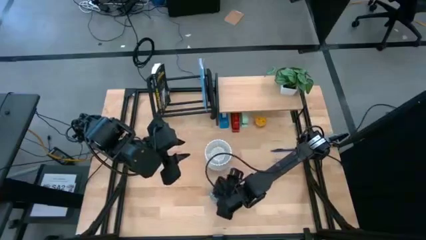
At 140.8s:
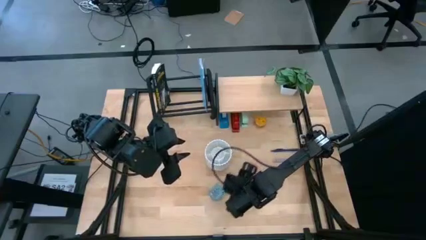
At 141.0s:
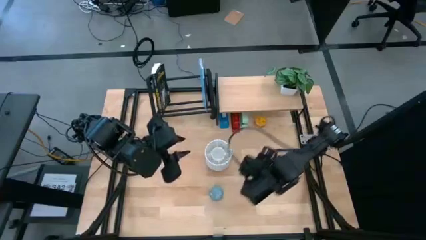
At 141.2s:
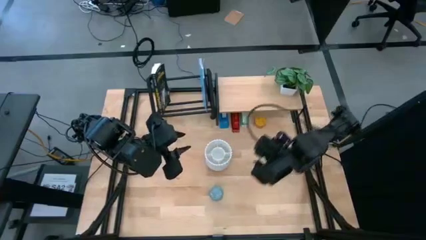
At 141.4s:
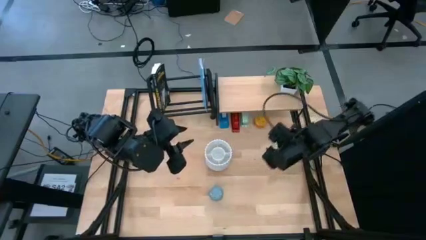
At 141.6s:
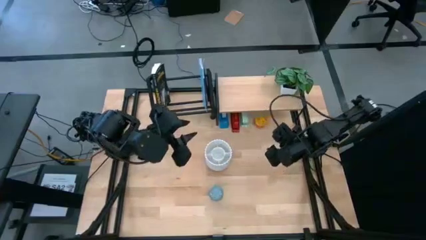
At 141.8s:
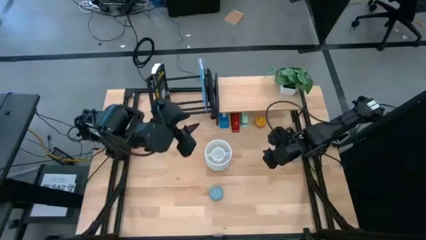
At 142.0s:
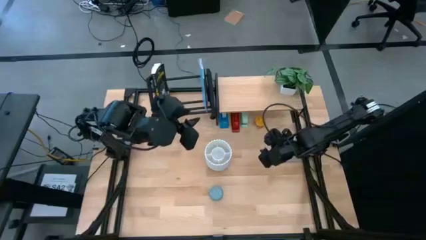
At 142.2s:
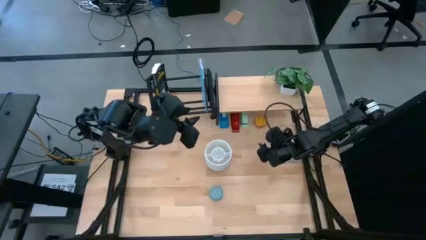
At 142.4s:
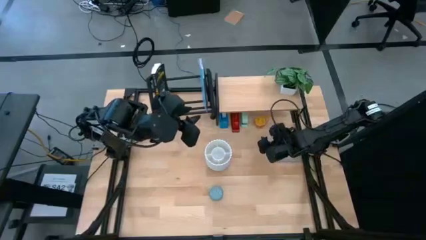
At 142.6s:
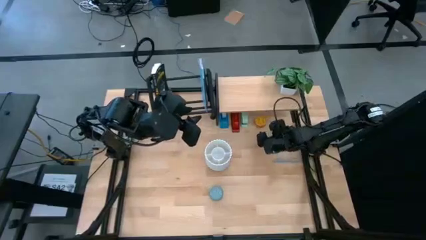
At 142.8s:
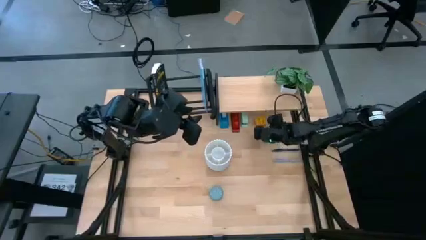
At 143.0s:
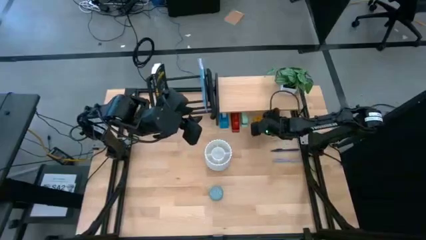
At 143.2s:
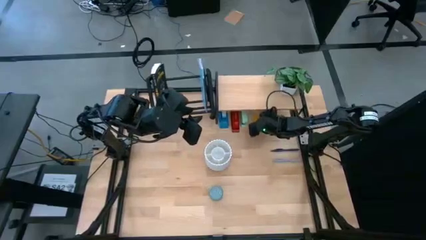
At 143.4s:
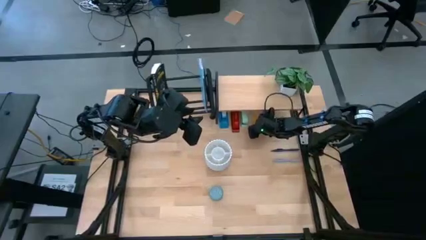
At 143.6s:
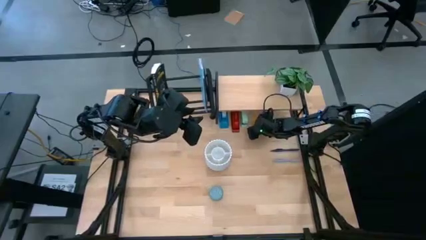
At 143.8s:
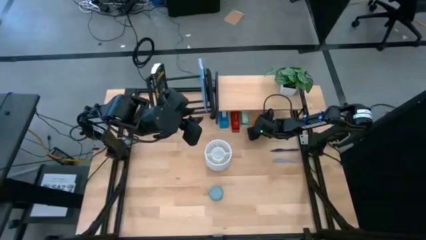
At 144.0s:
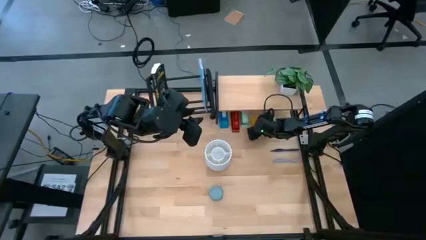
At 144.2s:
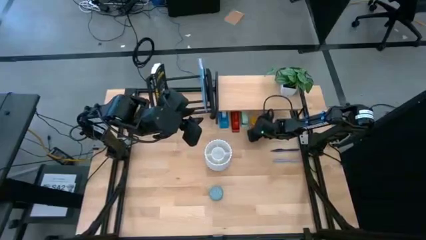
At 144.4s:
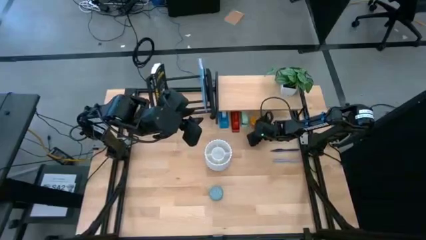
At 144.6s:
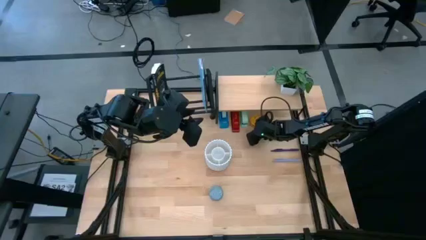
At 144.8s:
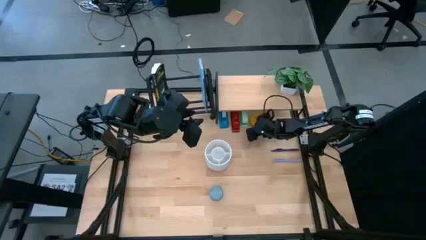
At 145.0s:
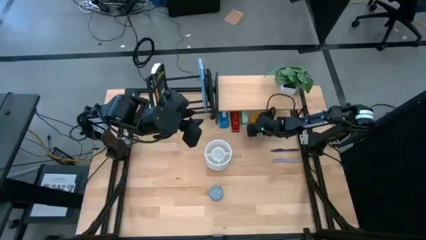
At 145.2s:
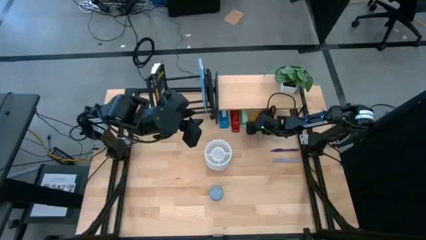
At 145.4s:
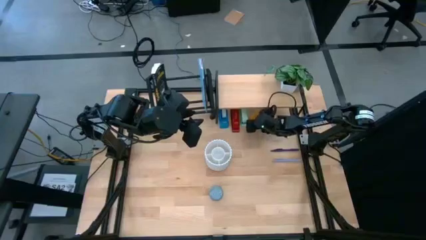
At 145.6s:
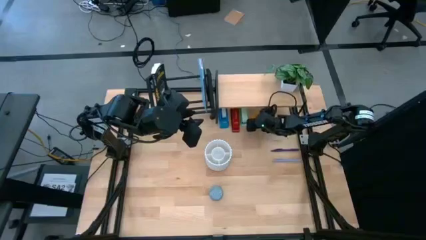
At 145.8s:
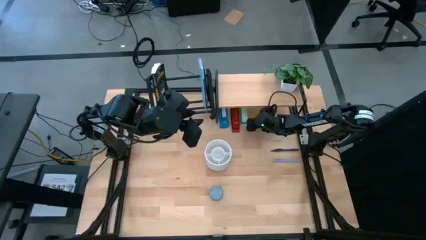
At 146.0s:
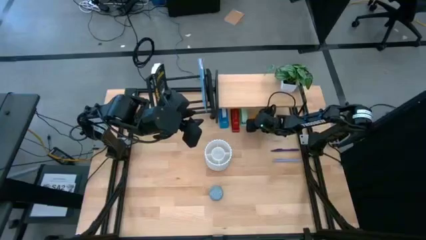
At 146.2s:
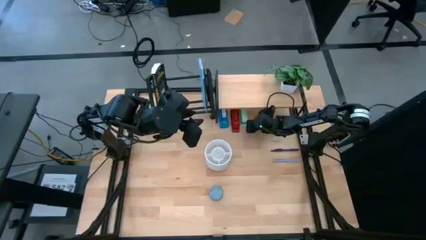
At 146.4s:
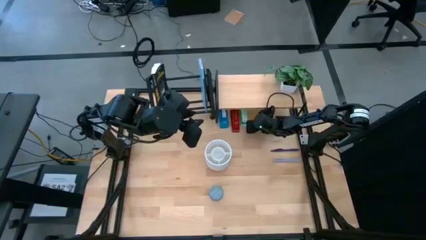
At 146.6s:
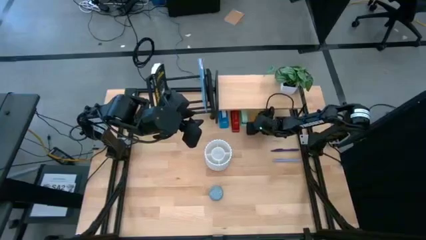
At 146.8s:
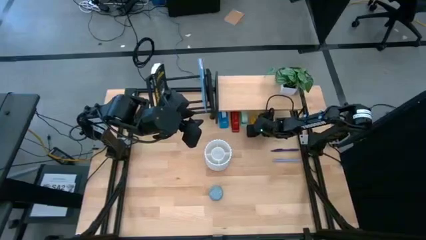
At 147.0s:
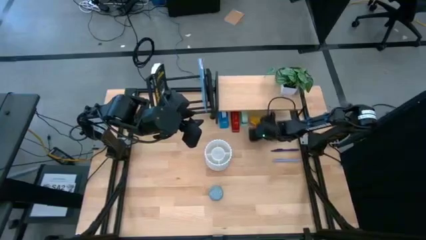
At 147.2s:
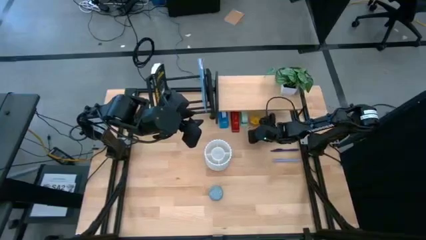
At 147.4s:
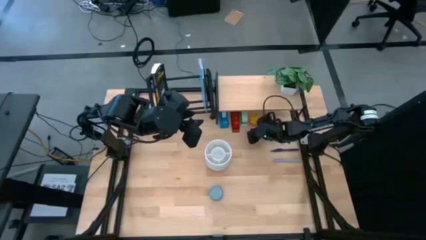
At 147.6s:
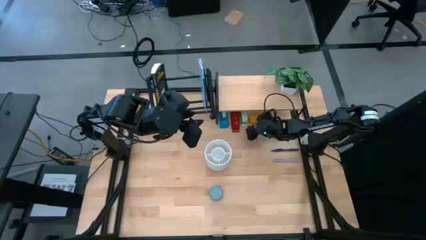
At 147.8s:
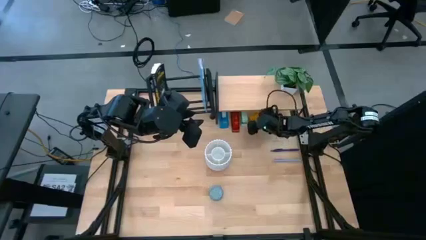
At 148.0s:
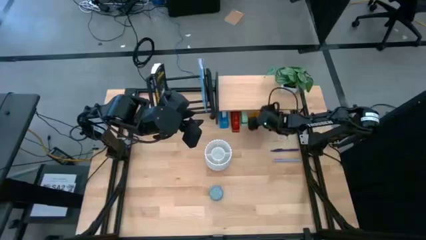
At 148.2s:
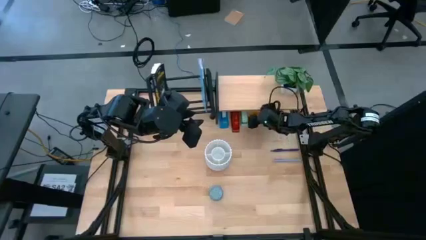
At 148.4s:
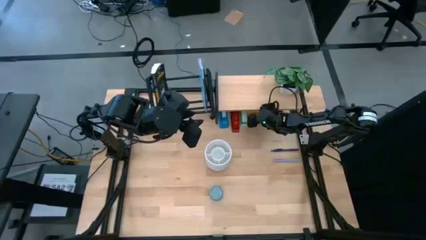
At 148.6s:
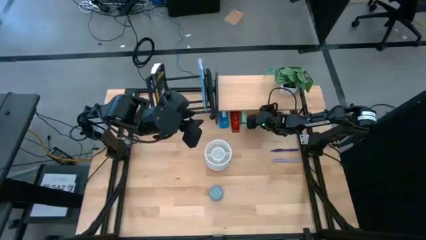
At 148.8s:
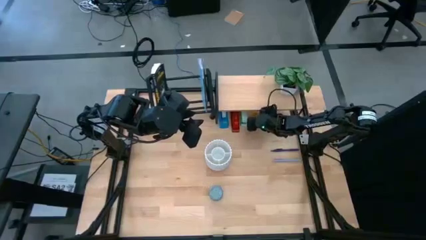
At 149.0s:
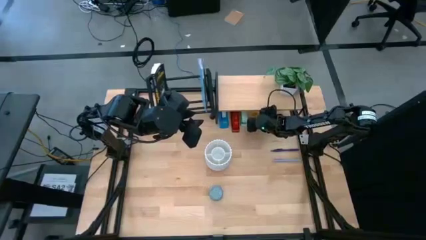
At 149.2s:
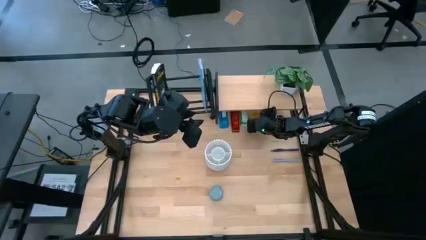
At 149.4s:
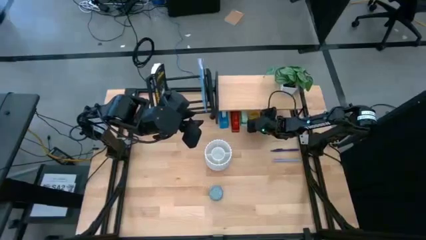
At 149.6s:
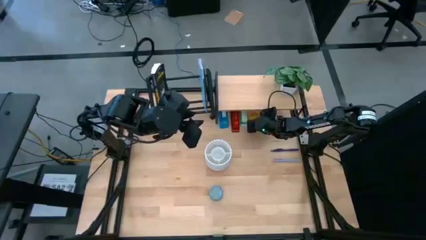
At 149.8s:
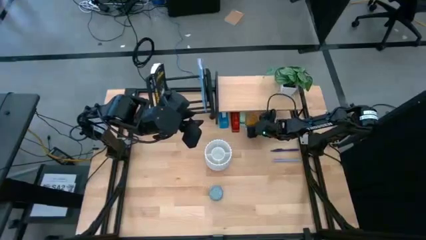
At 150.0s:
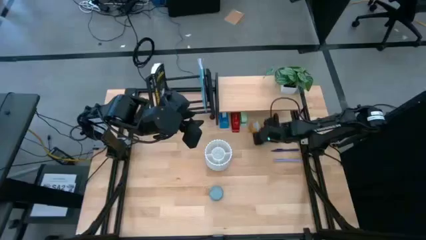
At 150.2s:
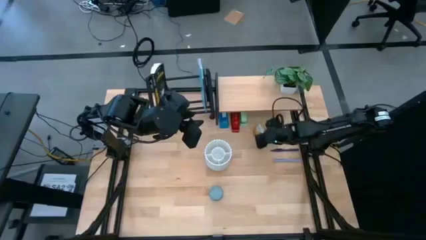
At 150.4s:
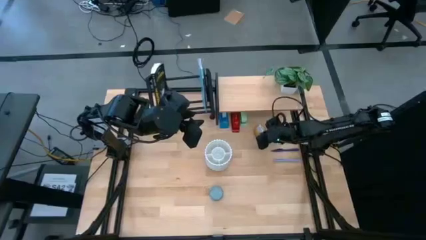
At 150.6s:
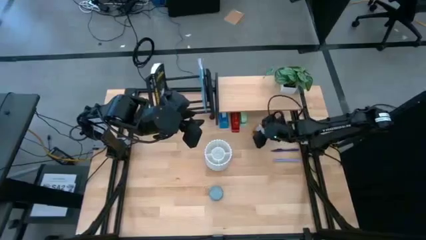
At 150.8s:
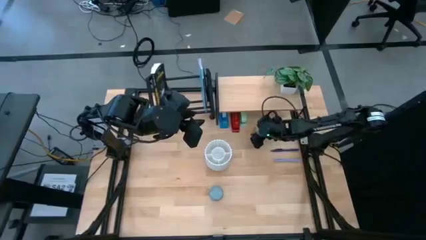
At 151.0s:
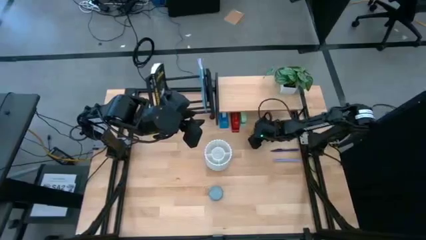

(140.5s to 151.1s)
Task: Stock shelves
Remove the yellow scented candle from under the shelf

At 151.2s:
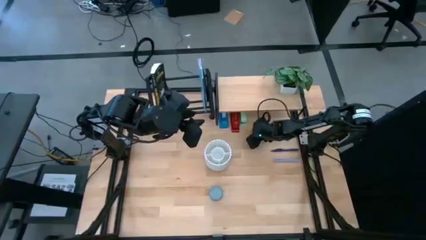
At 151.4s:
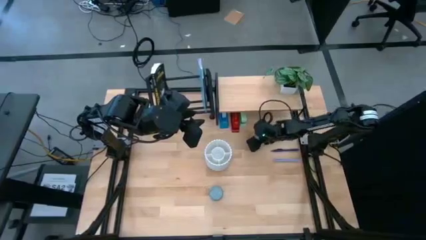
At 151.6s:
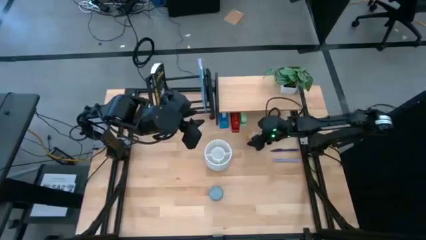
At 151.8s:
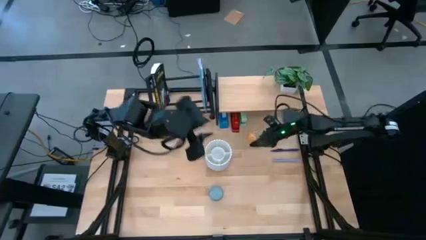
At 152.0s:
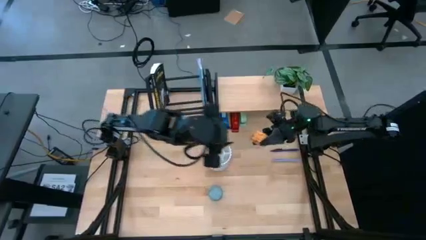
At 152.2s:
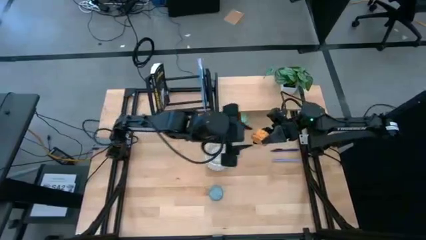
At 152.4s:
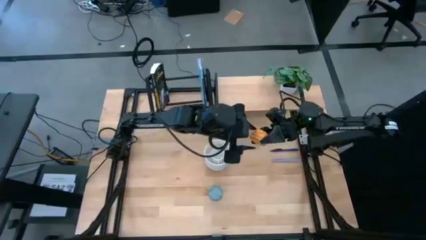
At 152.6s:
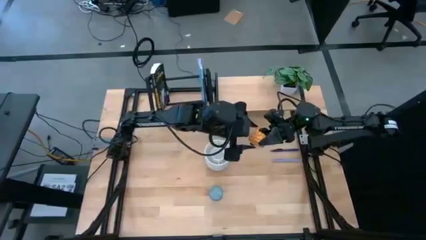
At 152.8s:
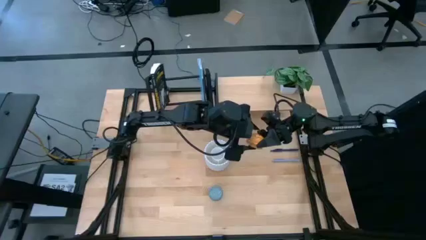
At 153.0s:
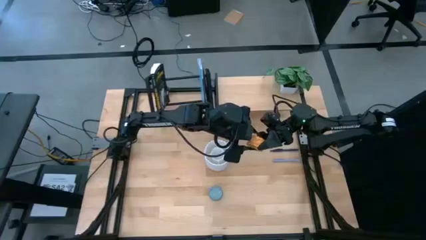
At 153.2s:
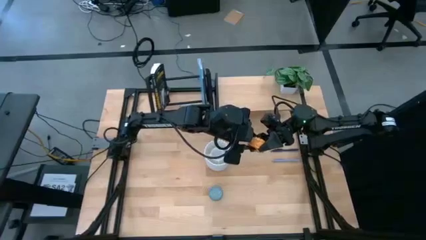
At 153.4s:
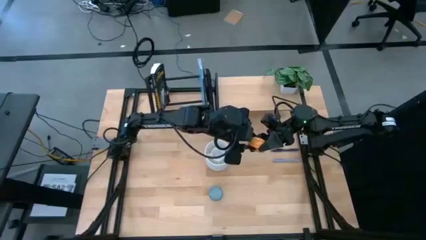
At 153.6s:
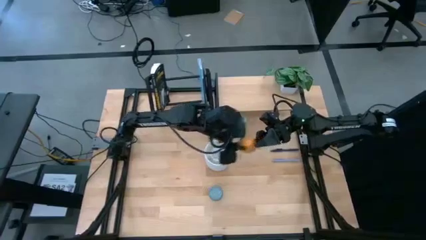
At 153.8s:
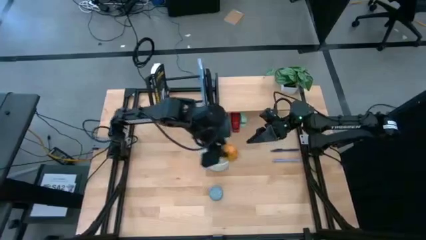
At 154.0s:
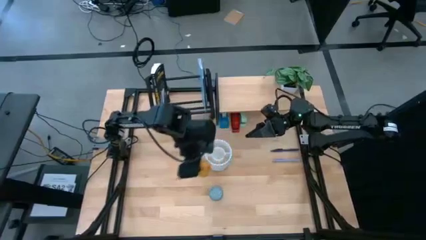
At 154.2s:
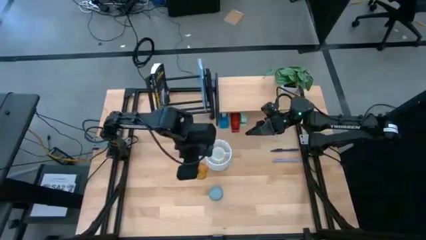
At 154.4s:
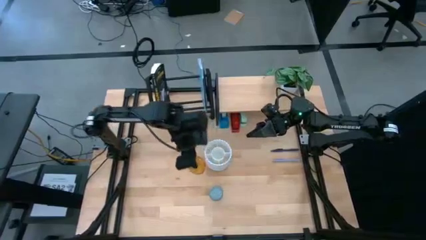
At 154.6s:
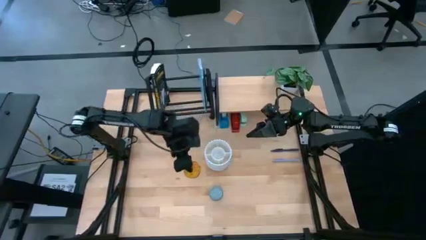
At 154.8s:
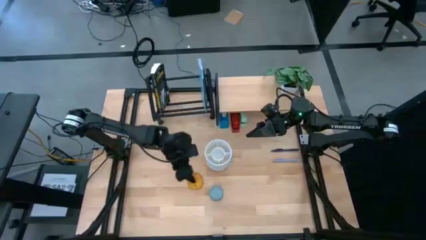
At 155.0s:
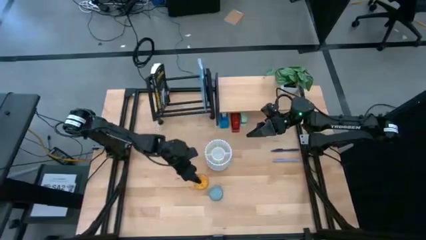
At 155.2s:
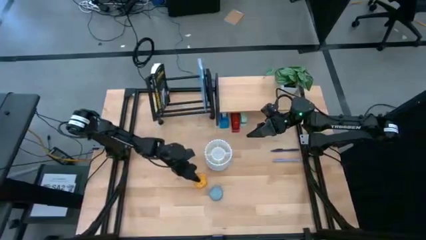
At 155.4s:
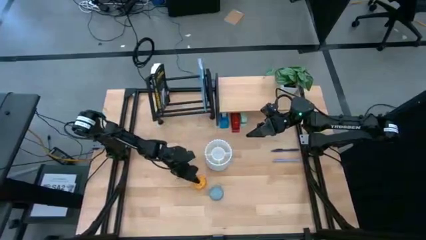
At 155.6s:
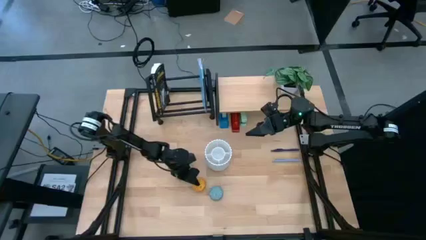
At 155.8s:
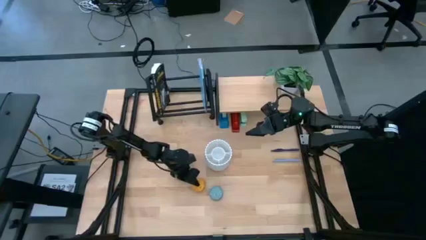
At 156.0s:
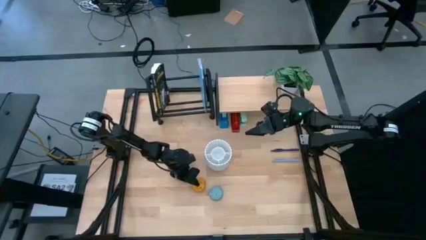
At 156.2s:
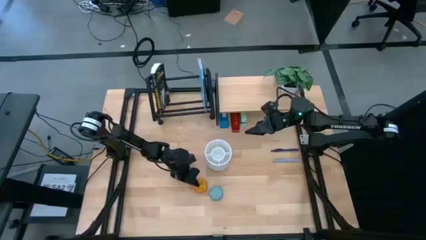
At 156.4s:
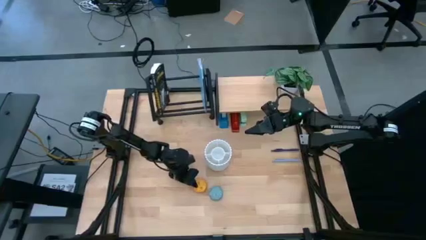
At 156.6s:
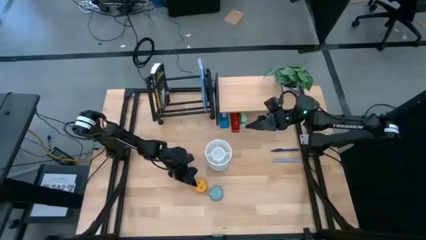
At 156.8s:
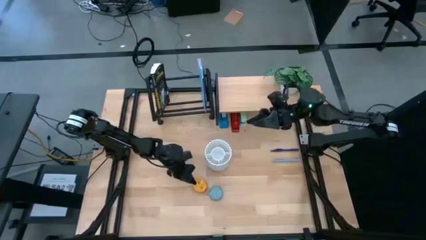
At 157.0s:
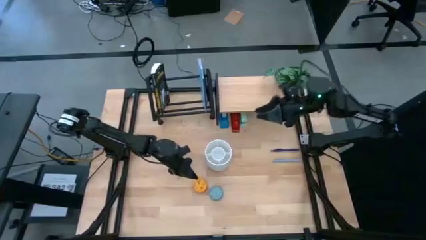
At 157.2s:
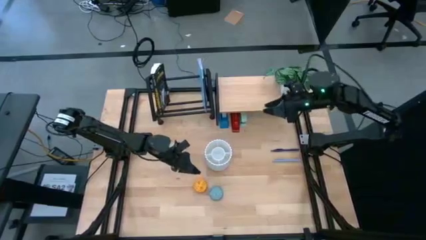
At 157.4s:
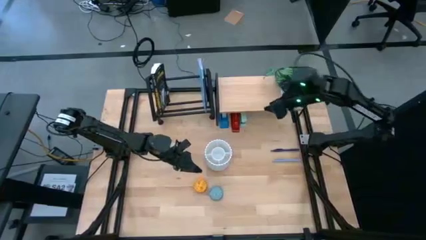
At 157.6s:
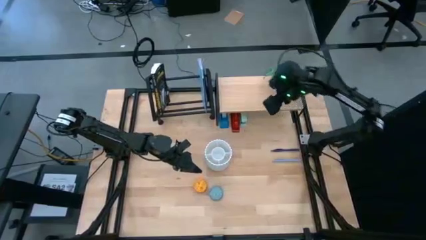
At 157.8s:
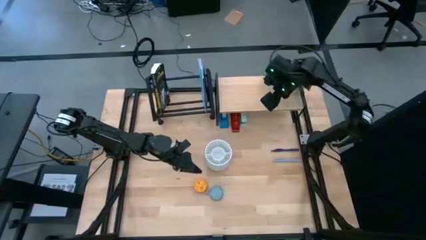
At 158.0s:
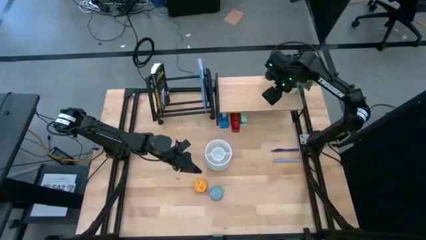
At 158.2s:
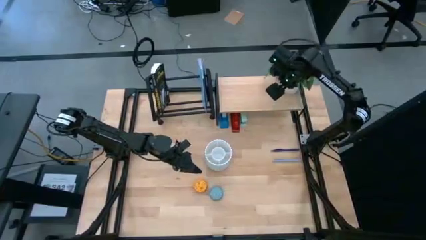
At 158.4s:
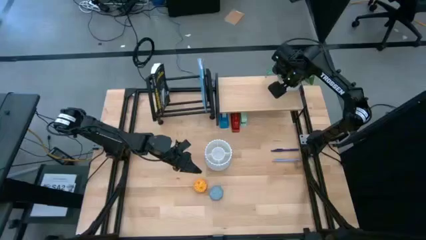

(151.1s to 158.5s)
Remove the yellow scented candle from under the shelf
